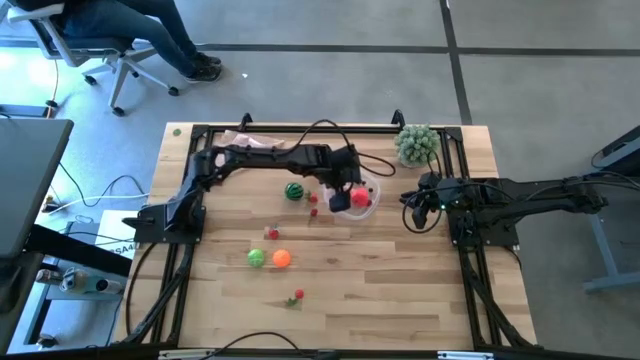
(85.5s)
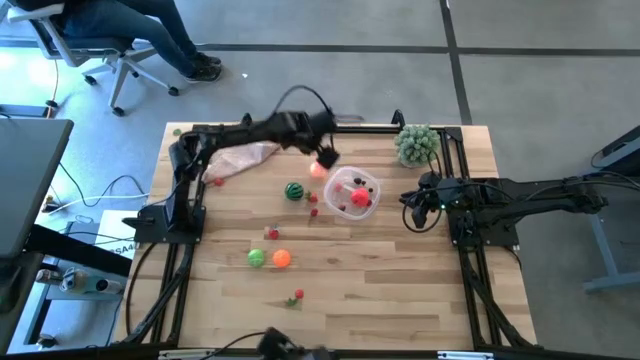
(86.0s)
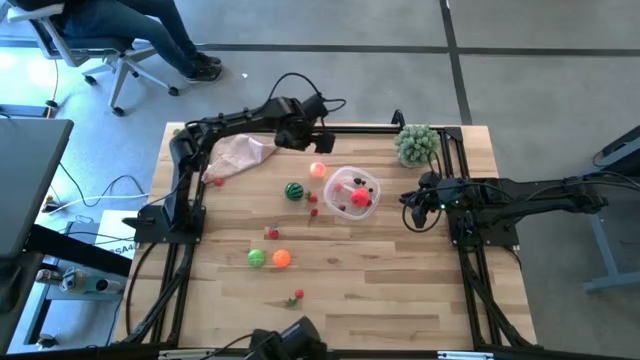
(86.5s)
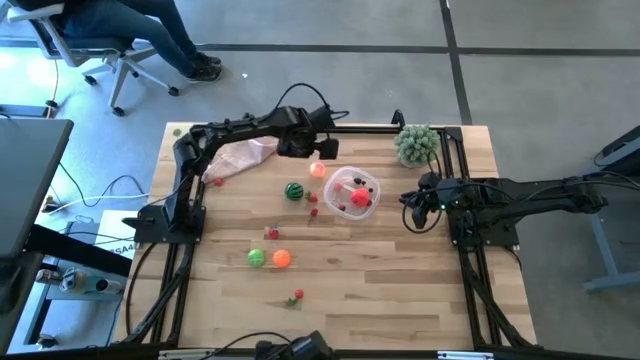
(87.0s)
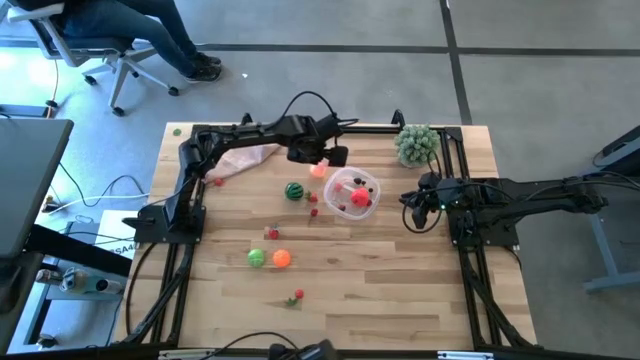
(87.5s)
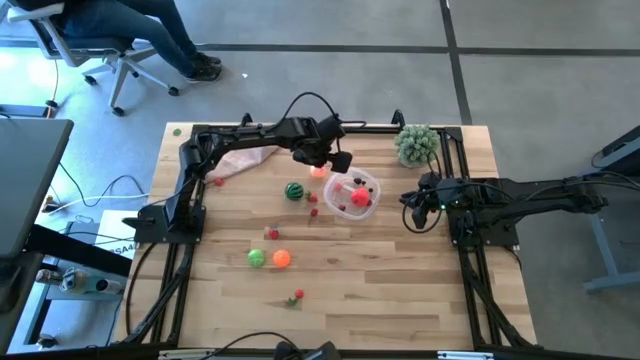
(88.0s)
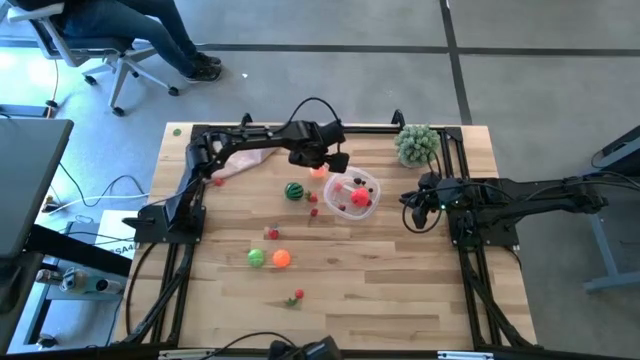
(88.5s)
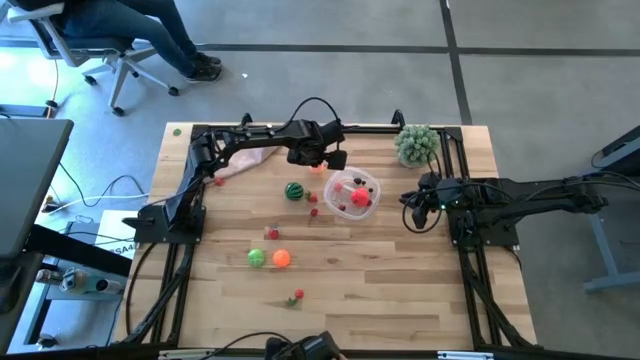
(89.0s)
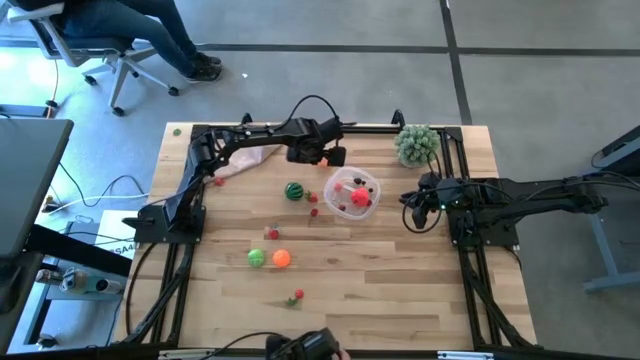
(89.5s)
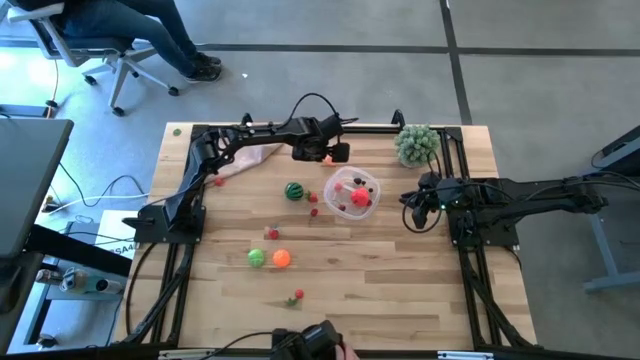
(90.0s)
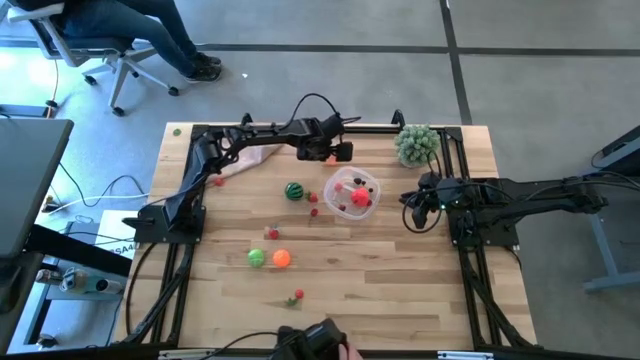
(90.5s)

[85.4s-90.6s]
Task: Pick and placing Produce into tupperware
Put the peach into the transparent bin

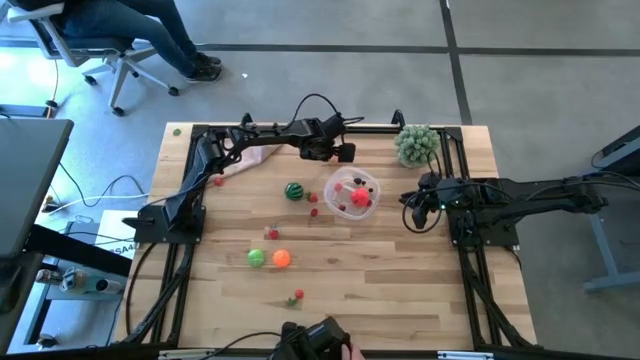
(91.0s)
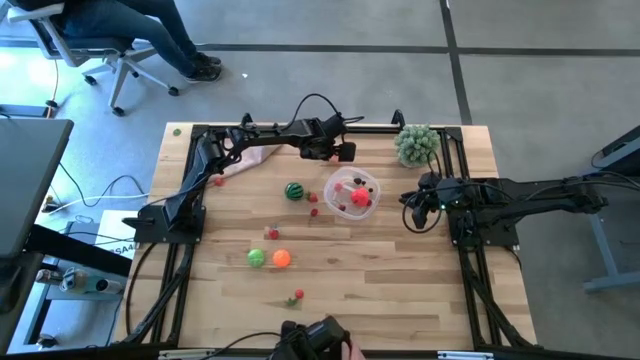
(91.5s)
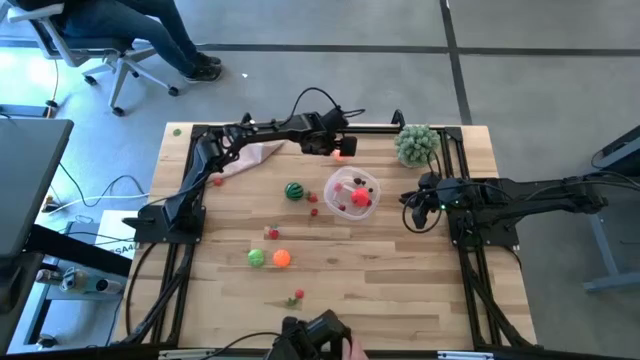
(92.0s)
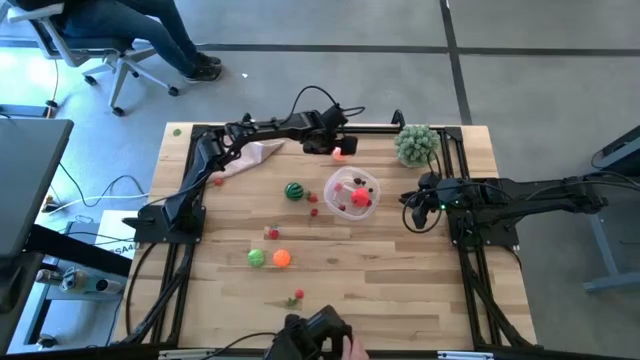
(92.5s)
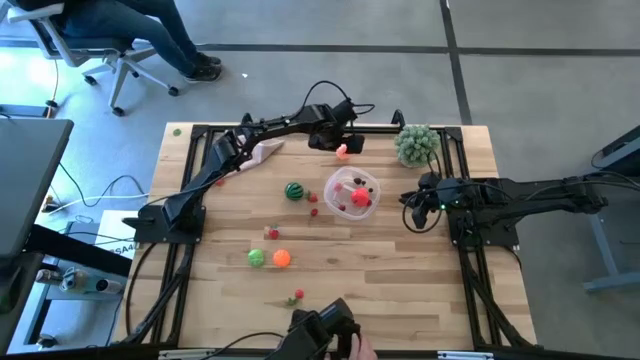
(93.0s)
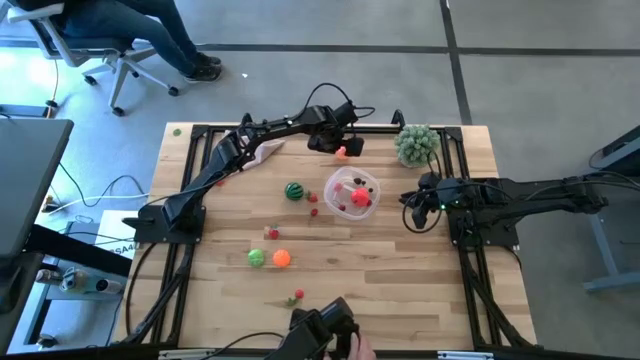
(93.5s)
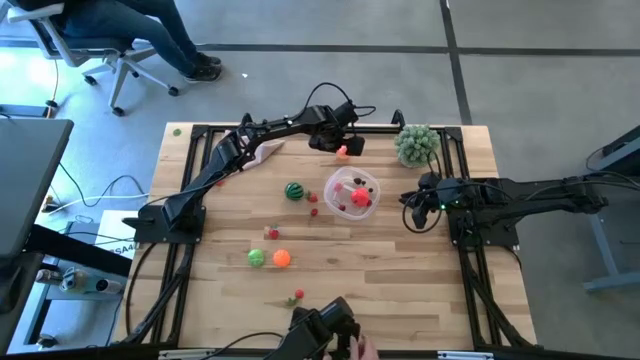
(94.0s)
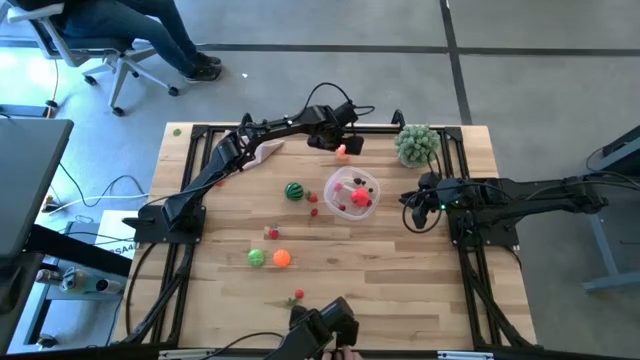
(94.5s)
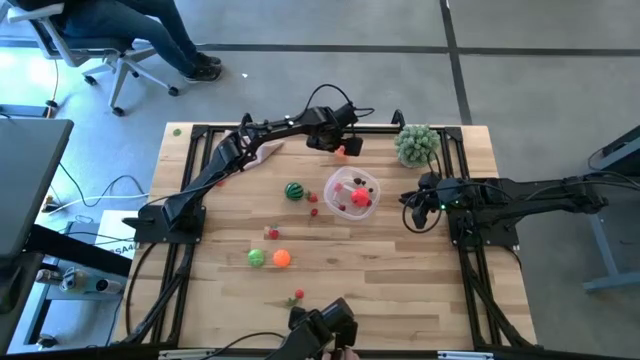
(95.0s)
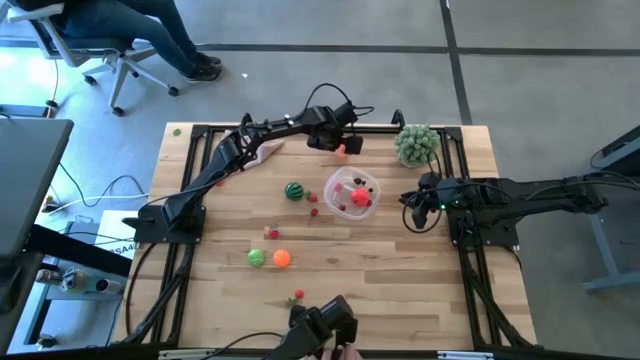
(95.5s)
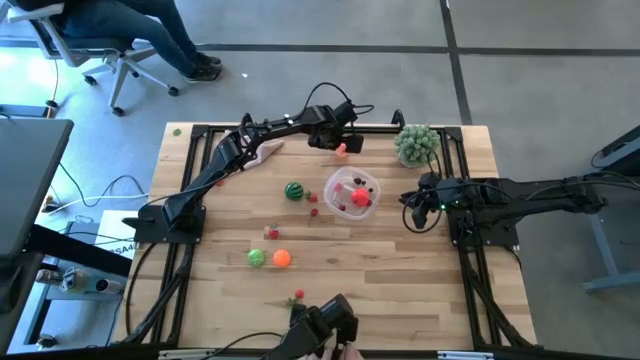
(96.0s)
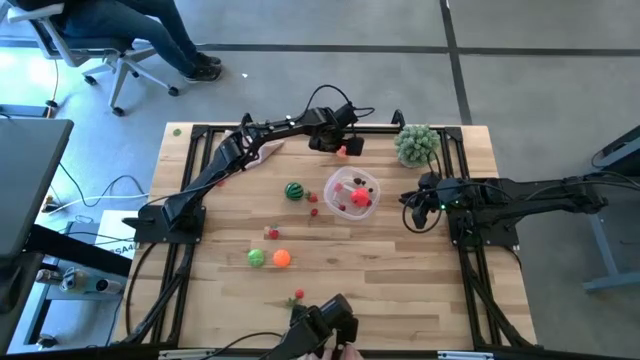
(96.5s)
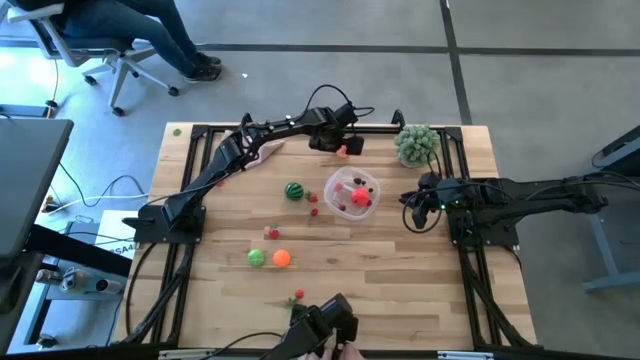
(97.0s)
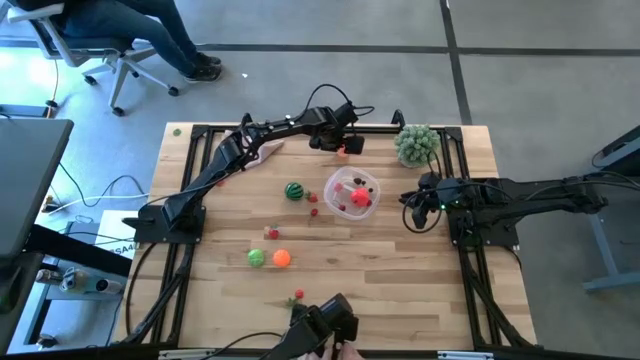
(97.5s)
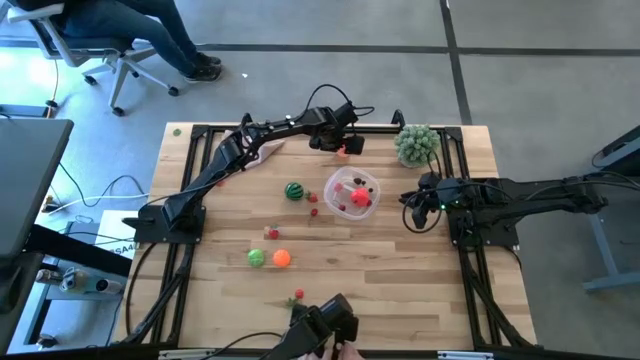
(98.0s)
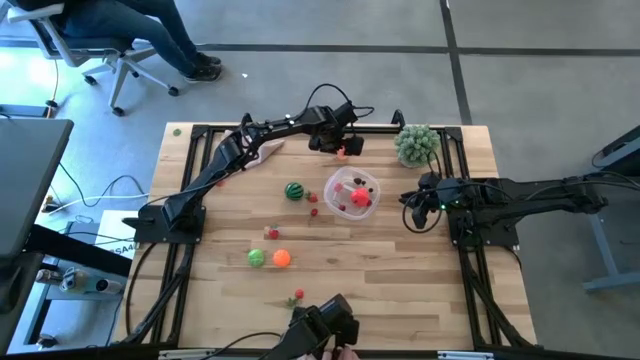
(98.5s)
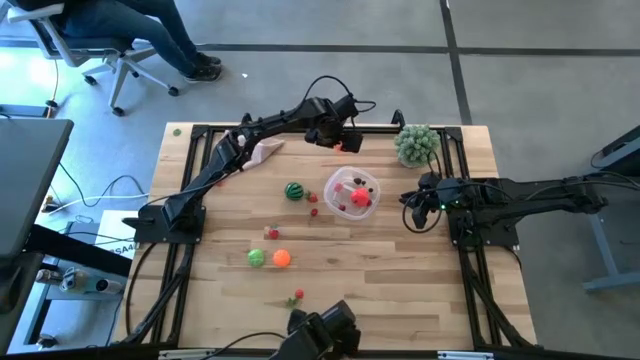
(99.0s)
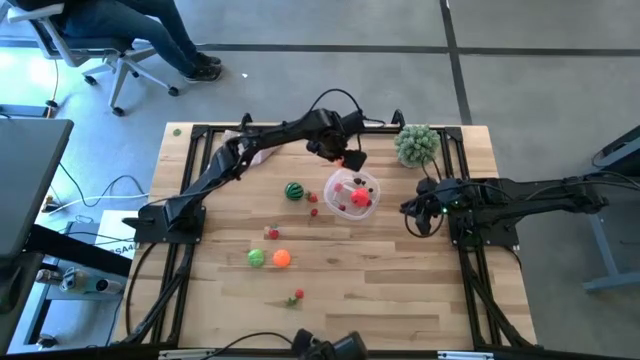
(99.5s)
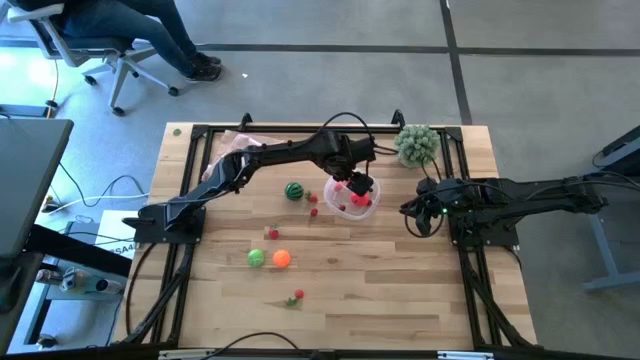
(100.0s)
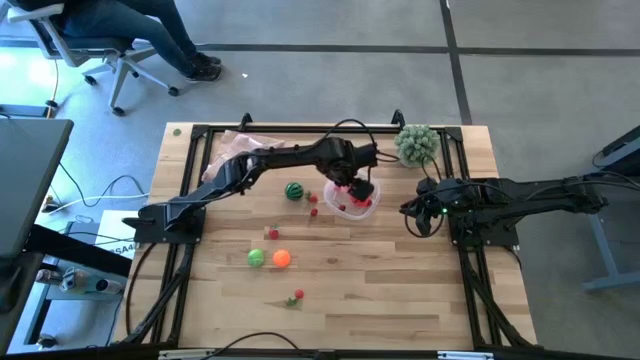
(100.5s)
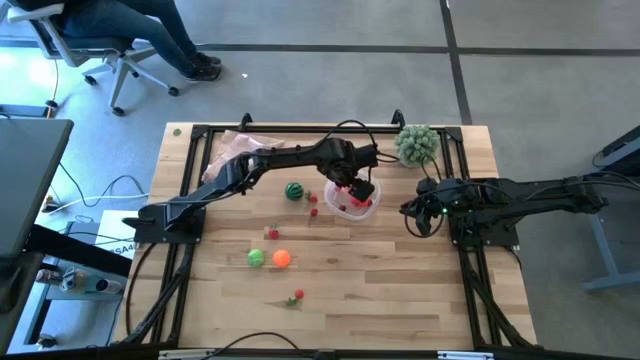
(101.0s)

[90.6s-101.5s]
Put the peach into the transparent bin

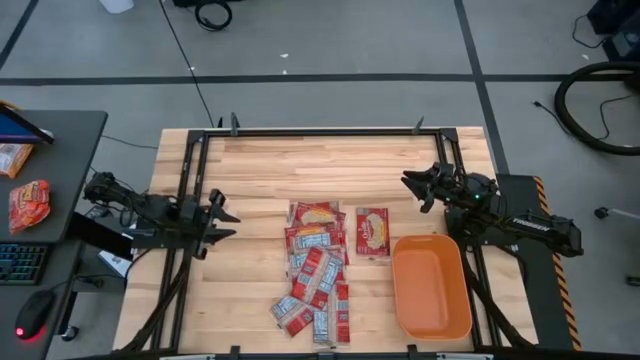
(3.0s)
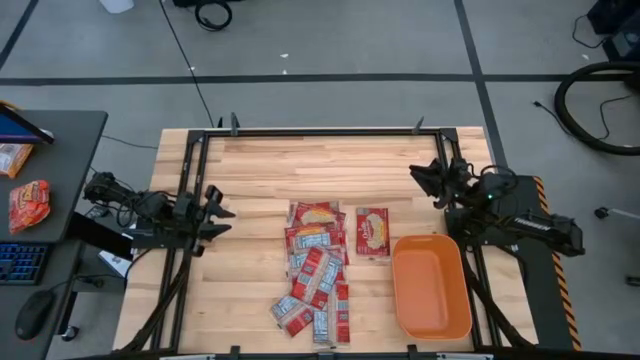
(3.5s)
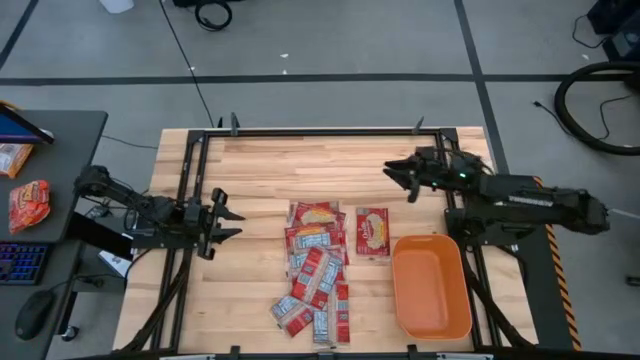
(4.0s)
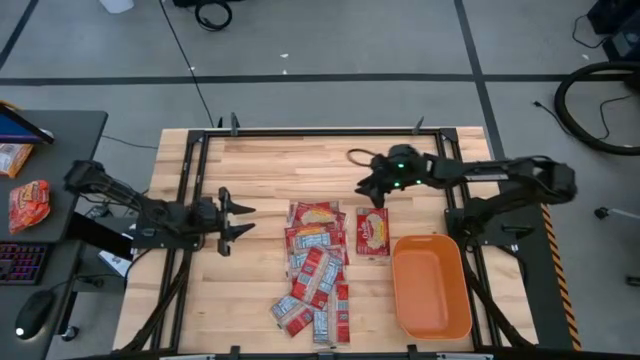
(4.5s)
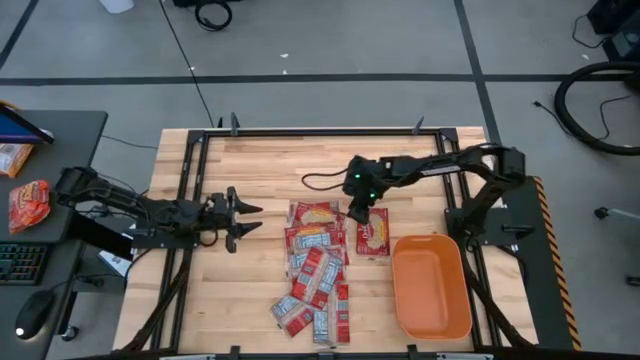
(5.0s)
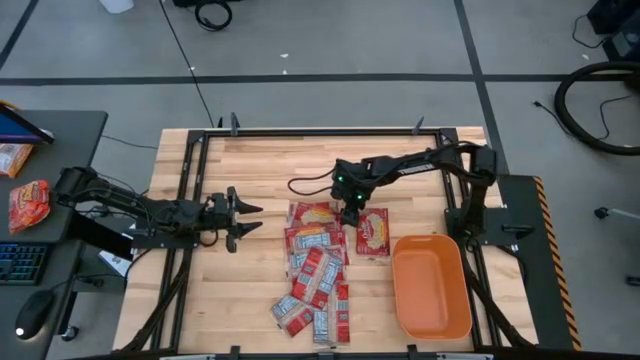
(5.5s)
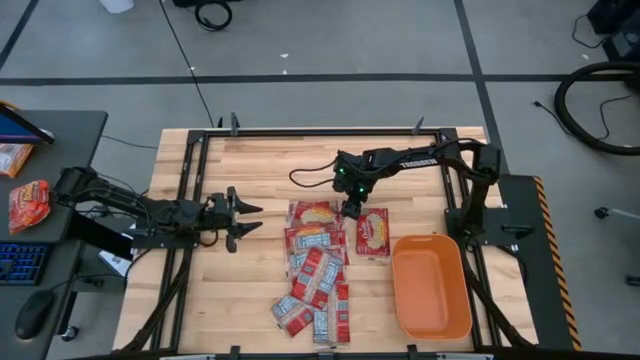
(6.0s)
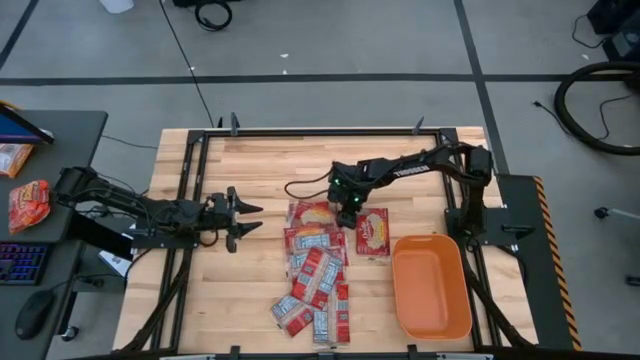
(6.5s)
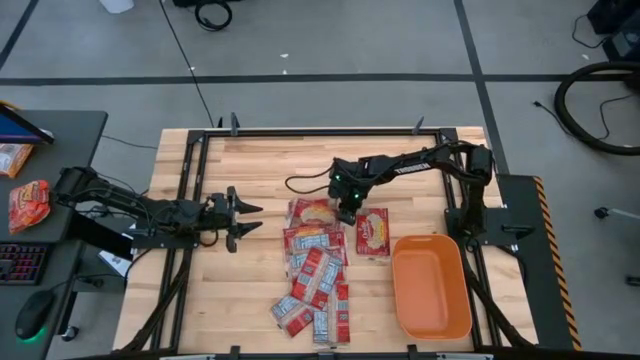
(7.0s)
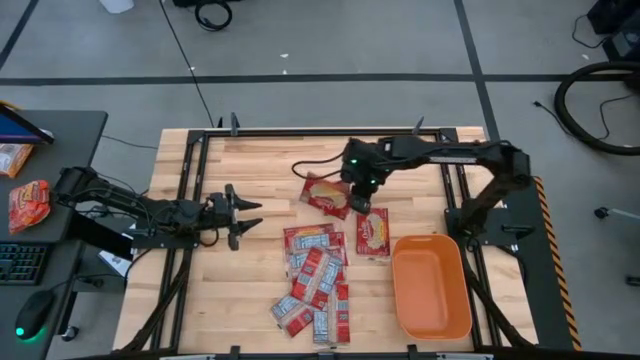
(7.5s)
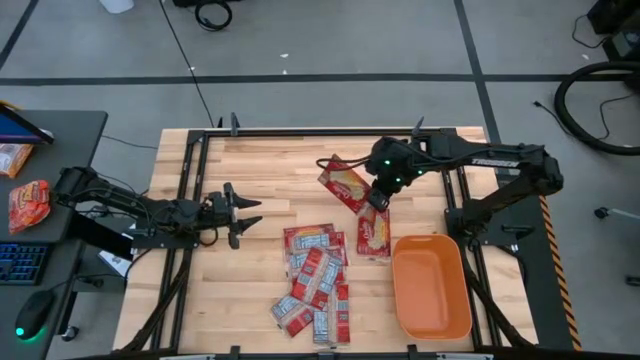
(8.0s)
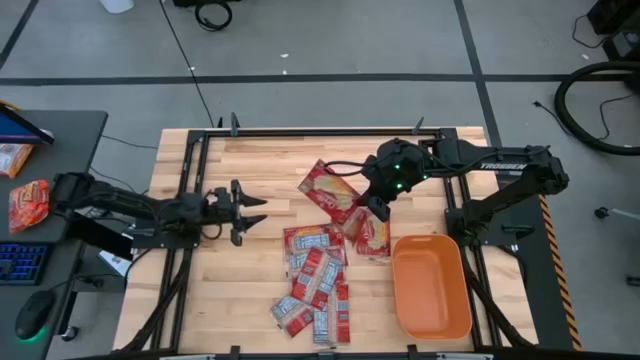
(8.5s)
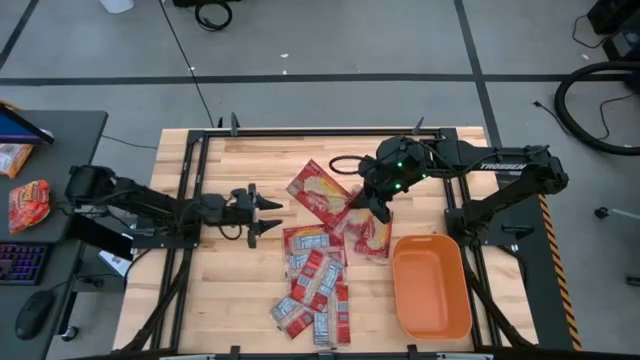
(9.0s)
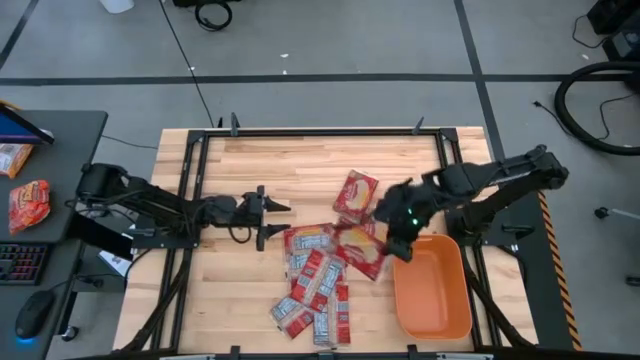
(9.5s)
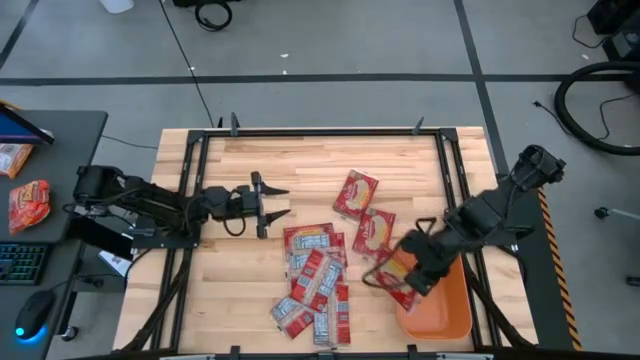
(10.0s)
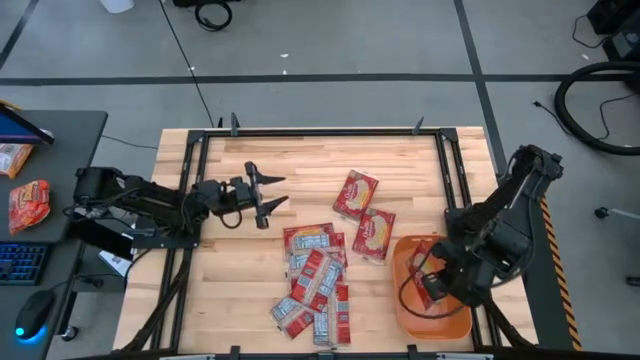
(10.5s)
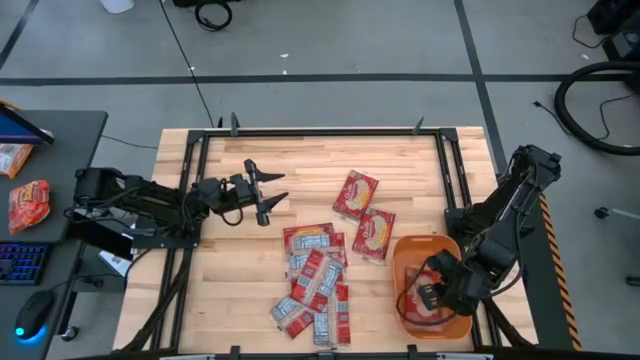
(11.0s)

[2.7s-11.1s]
Task: Sort popcorn bags into baskets
Put the red popcorn bag into the orange bin
